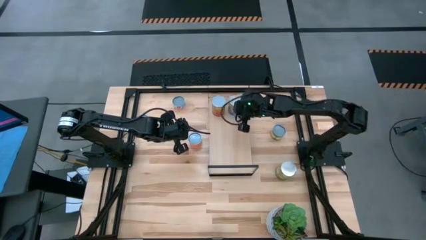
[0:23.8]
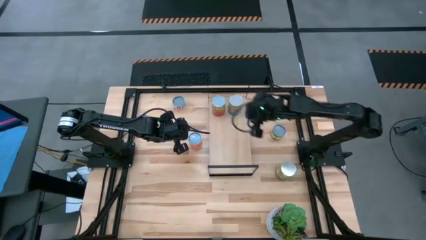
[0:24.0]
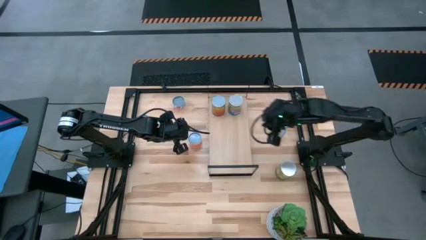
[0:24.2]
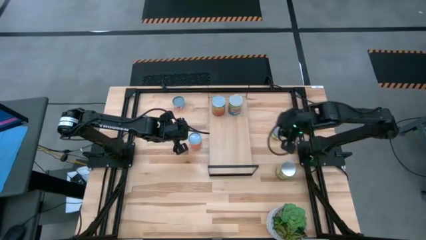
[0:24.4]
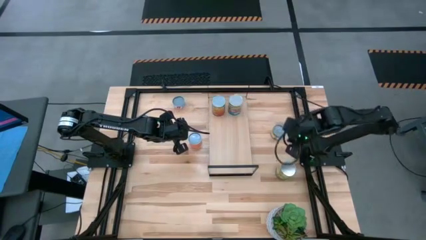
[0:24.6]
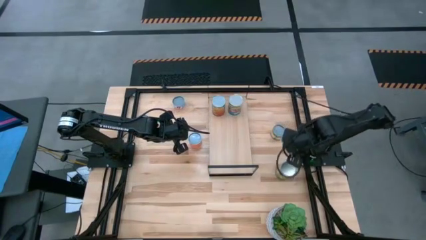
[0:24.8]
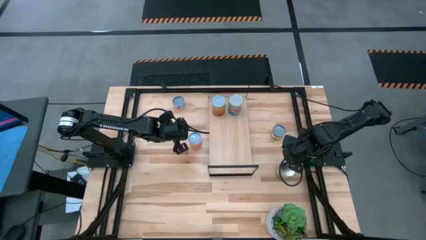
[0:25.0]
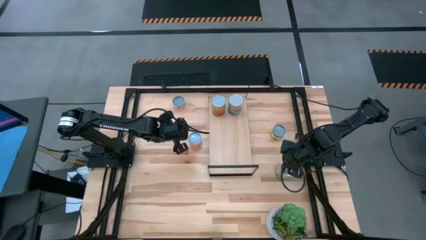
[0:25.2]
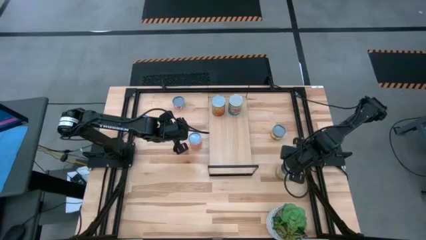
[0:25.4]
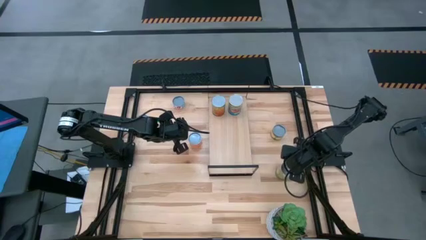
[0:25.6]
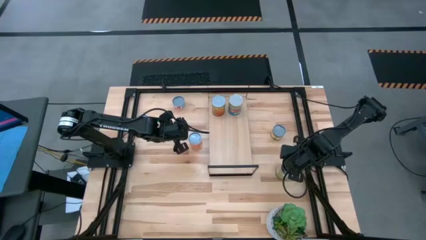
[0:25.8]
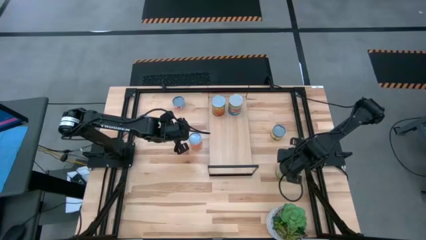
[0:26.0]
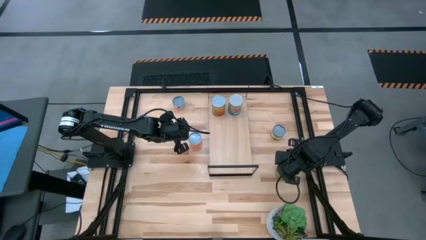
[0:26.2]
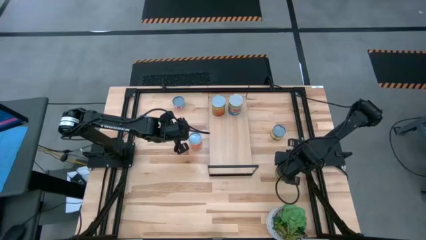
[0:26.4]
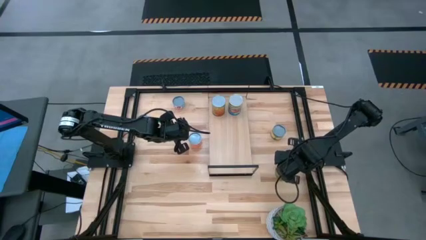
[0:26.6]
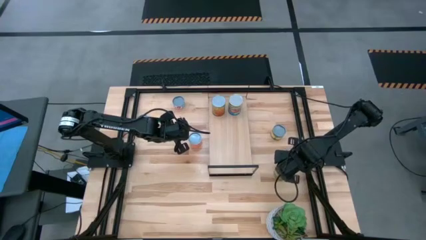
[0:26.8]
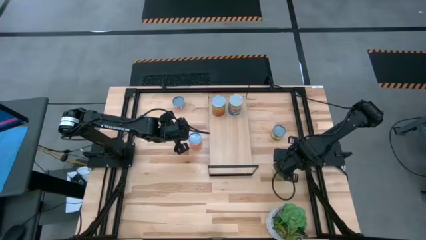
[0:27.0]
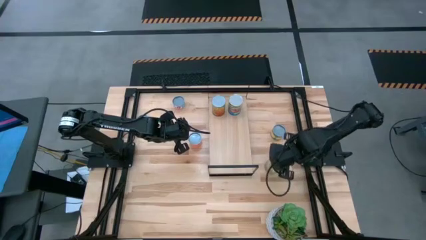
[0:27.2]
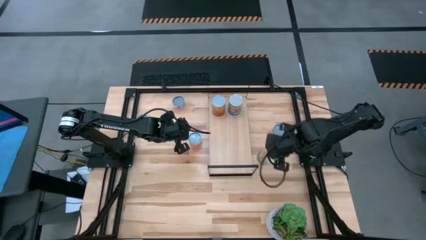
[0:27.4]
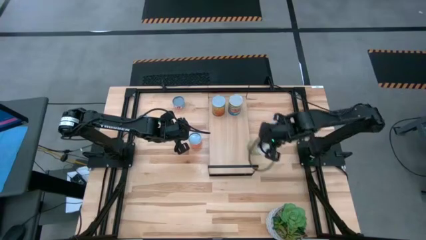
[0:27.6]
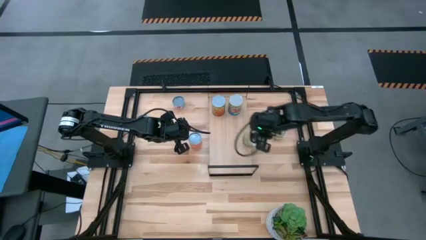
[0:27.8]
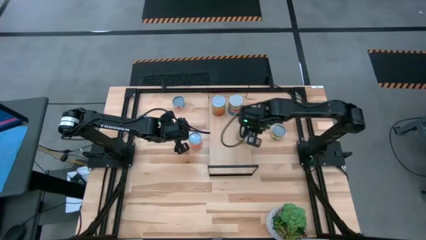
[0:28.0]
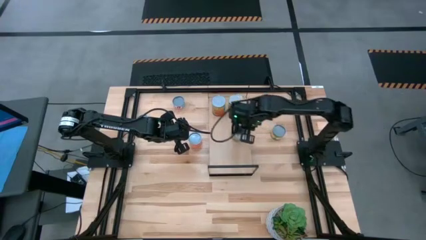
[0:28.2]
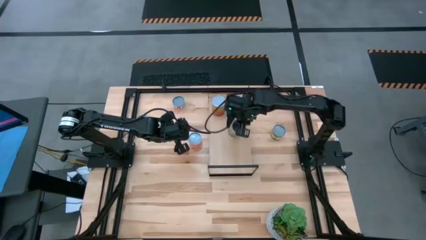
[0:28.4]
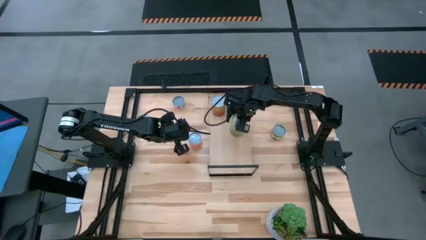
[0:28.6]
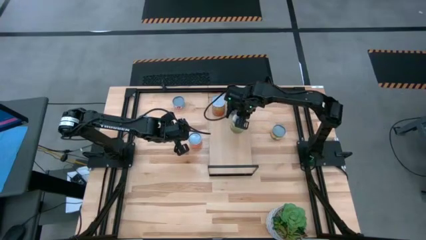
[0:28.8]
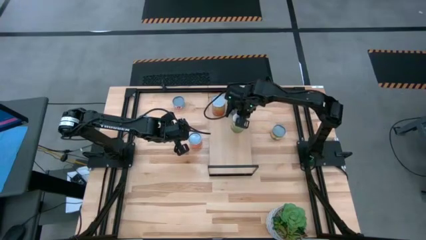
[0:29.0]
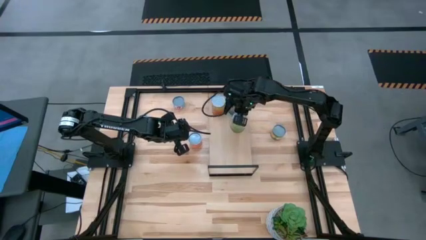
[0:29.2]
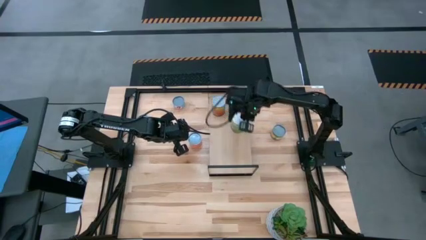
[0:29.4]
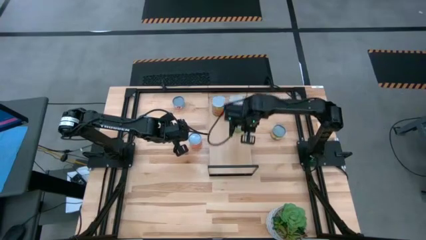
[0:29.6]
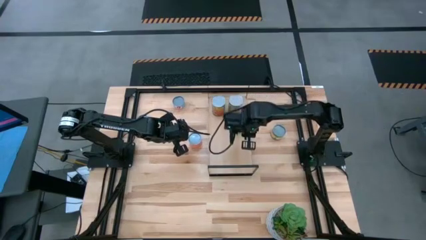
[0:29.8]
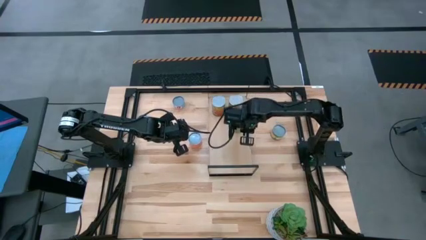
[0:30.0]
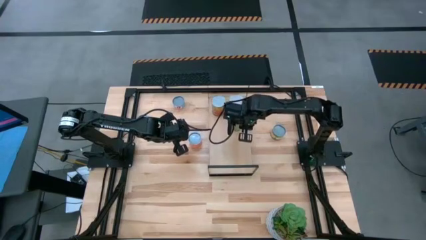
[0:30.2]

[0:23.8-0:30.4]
Task: Pick and place cans onto a shelf
Put the canned pears on the shelf

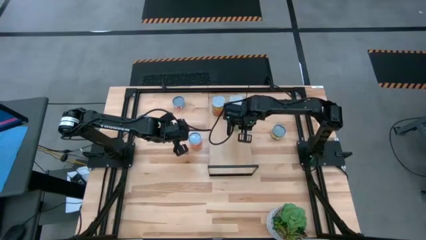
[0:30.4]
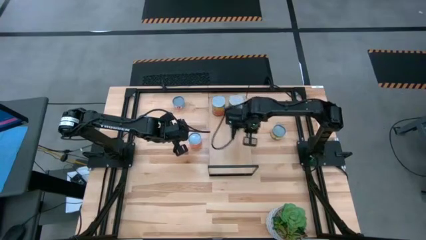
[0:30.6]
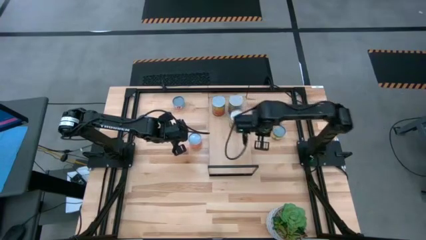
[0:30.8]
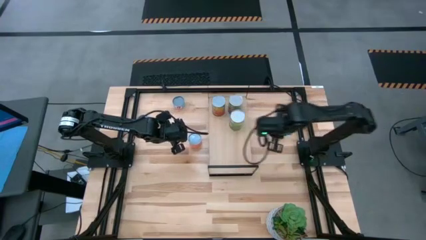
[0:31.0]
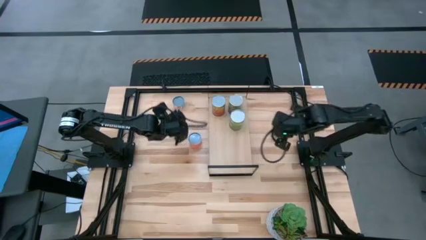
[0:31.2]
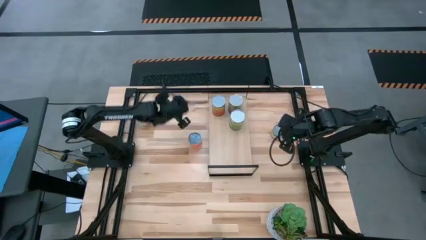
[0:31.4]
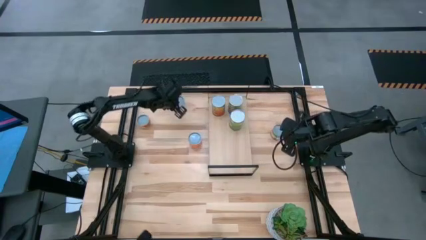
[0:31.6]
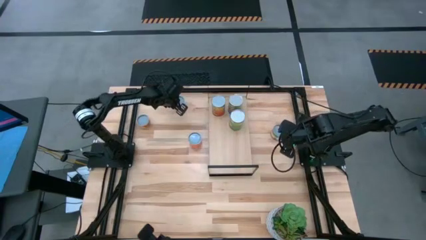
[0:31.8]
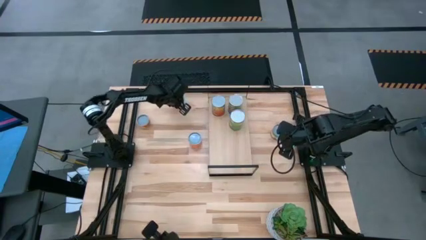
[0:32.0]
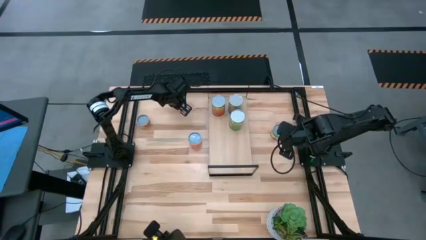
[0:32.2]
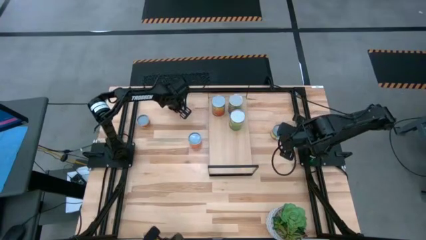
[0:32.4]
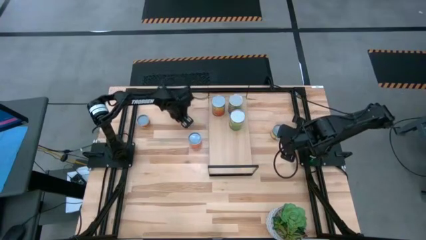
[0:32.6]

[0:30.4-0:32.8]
Move the canned salmon to the center of the table

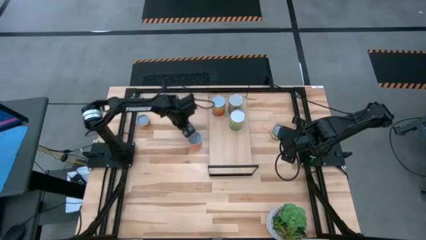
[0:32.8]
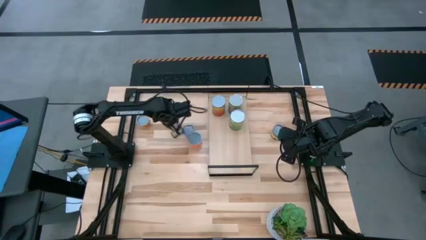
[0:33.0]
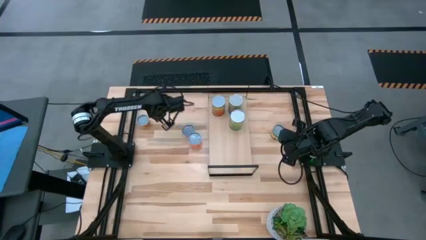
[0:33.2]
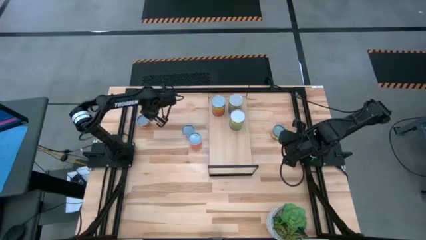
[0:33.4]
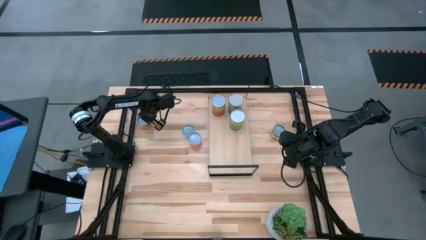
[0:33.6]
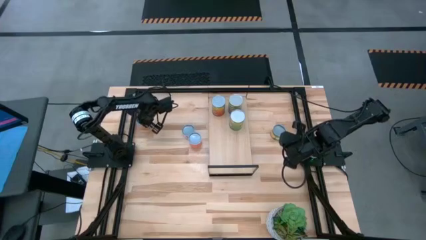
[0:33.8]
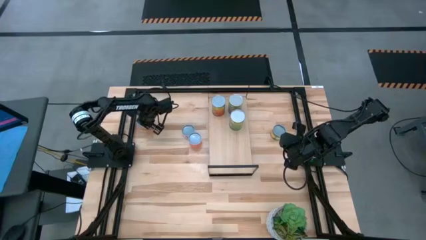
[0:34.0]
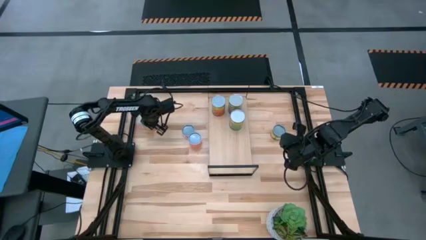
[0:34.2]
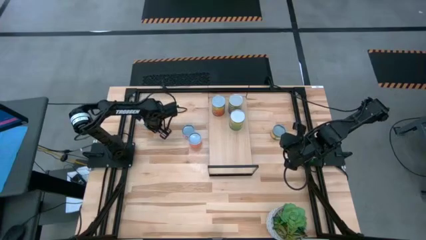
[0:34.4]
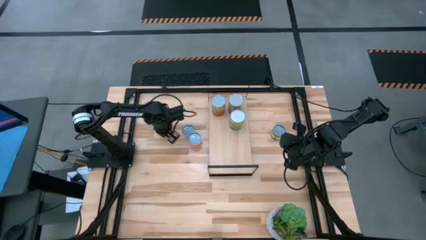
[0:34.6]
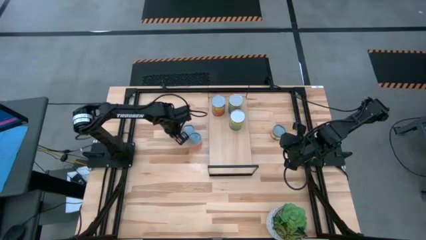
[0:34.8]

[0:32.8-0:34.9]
Move the canned pineapple rings to the center of the table

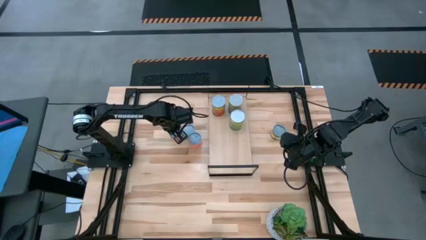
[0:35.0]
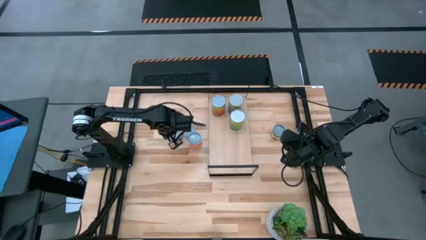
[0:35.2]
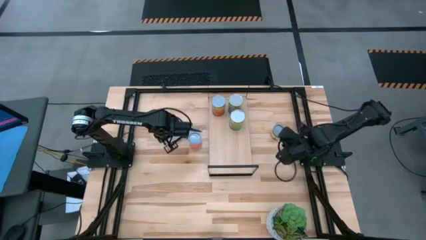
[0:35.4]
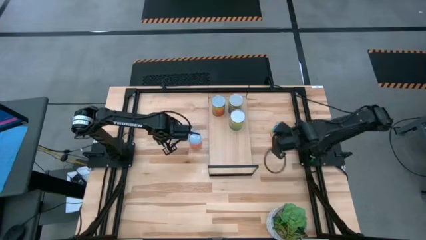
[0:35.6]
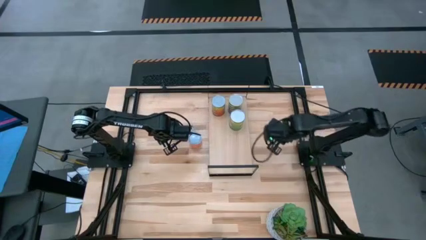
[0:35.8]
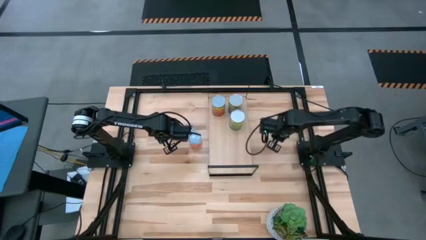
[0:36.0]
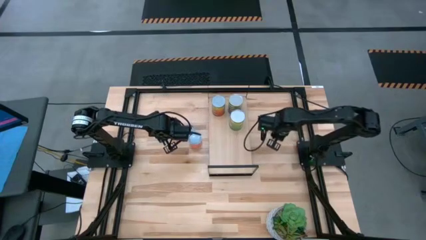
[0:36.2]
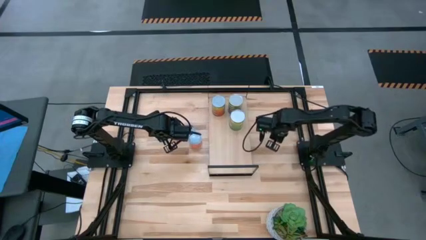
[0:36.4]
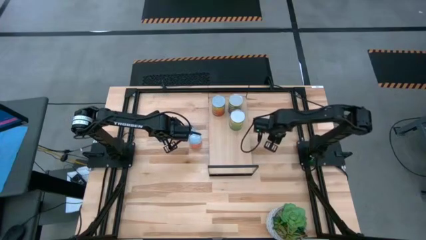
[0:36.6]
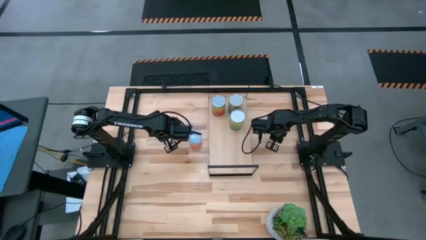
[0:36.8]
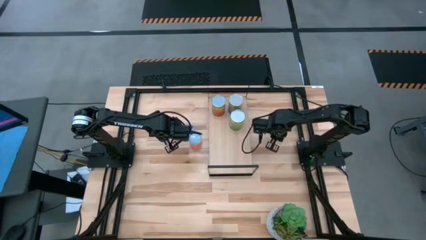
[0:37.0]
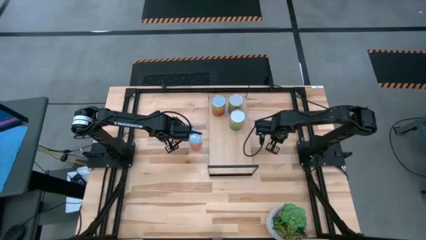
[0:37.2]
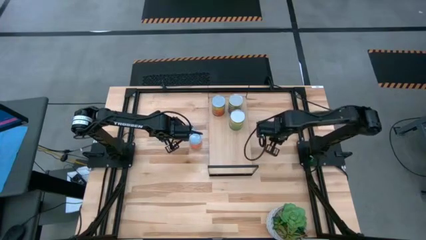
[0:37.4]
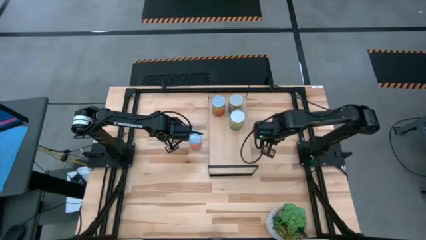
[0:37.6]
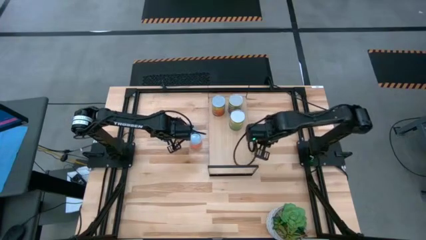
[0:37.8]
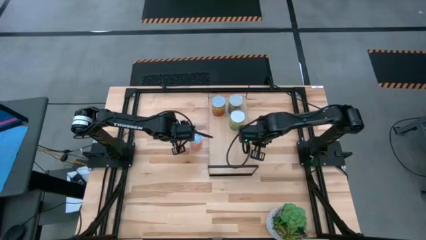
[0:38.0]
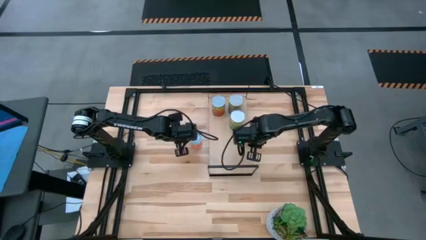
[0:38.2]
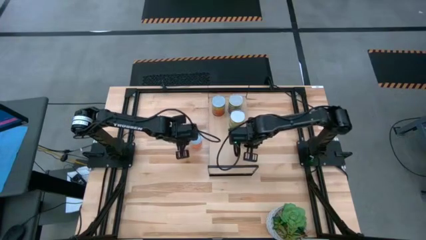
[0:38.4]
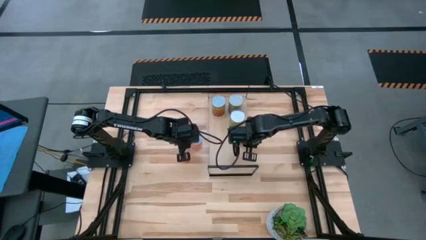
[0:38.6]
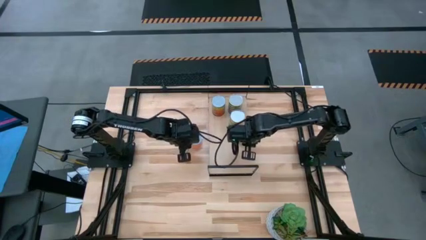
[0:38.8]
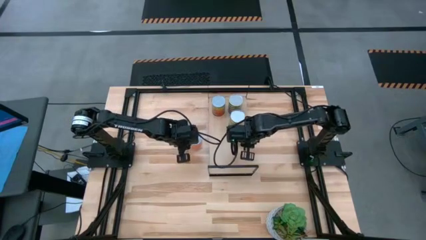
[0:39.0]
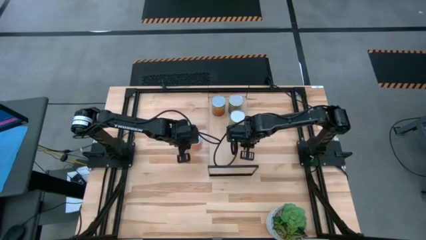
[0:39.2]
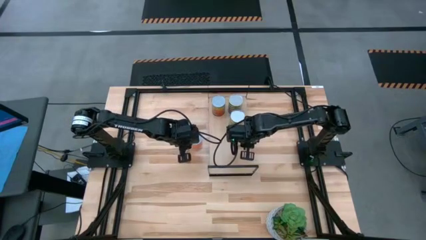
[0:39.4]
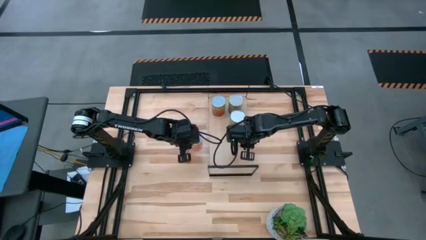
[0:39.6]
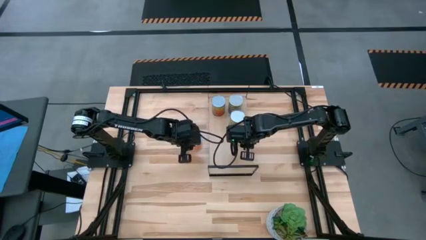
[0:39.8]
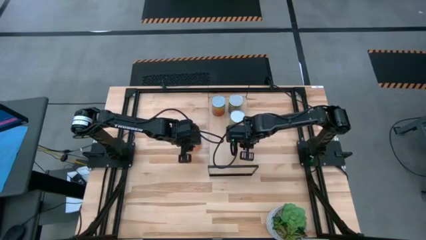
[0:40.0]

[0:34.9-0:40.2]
Put the canned peaches on the shelf
